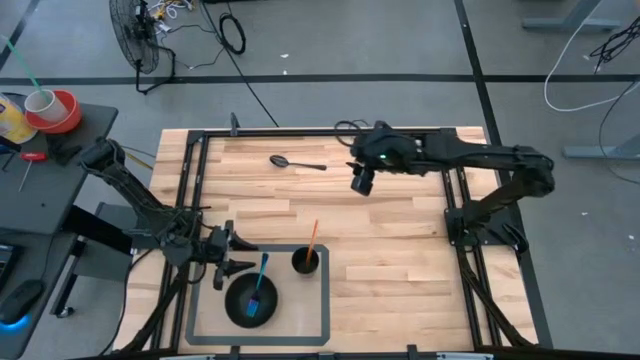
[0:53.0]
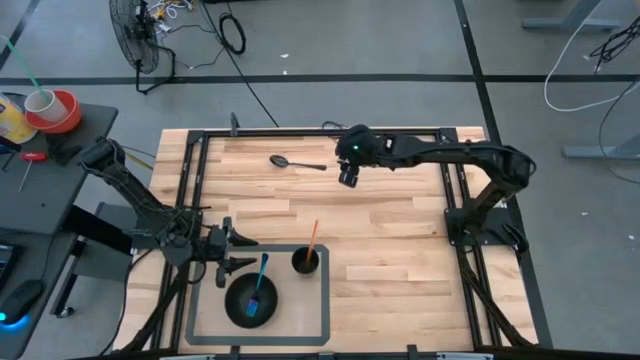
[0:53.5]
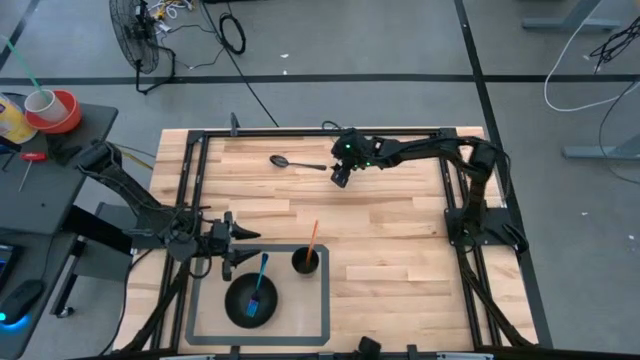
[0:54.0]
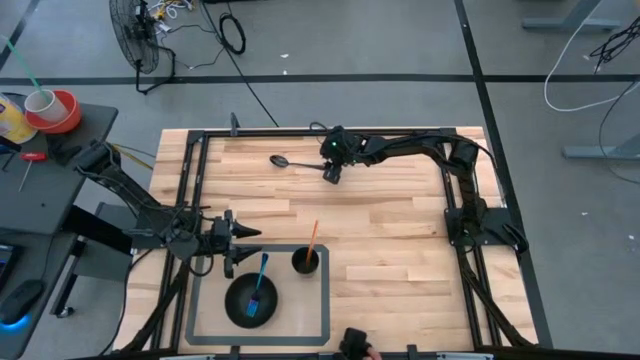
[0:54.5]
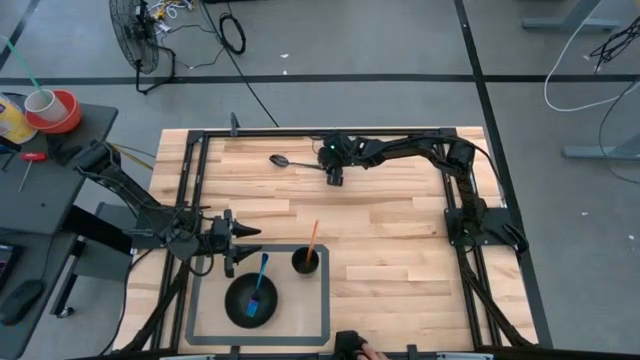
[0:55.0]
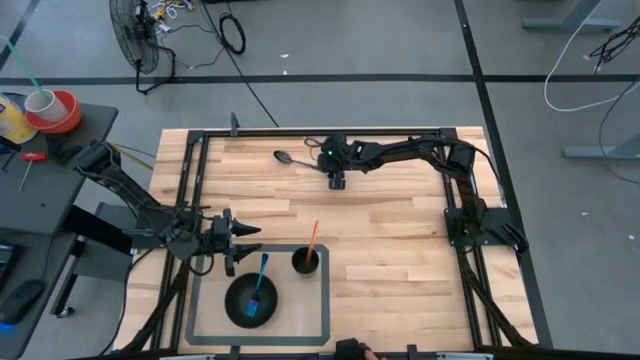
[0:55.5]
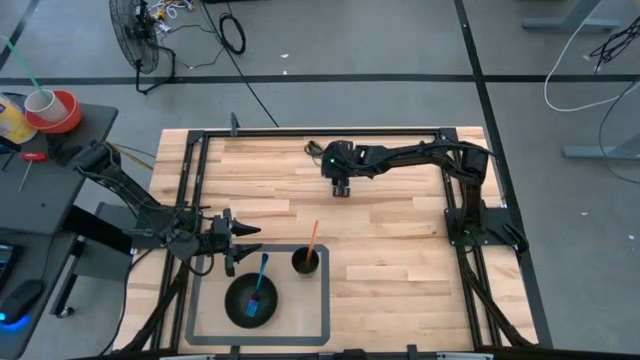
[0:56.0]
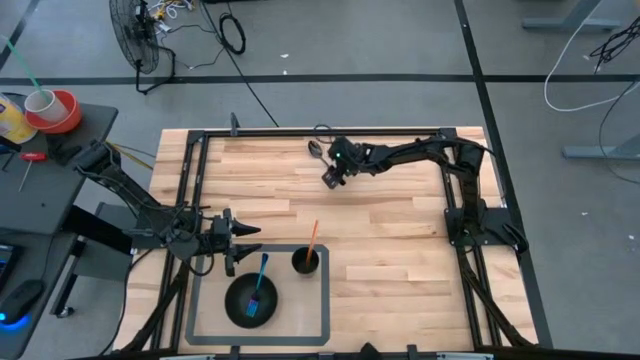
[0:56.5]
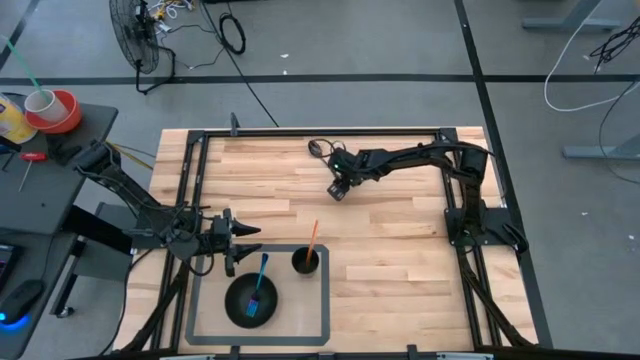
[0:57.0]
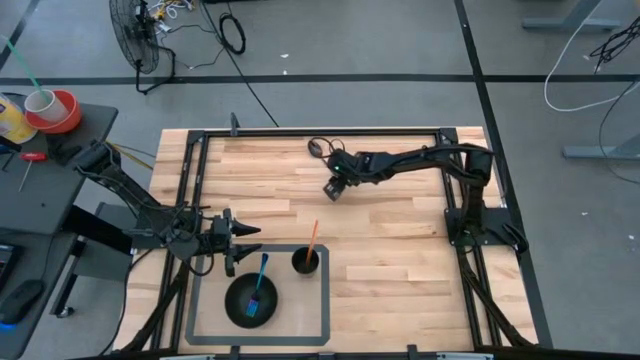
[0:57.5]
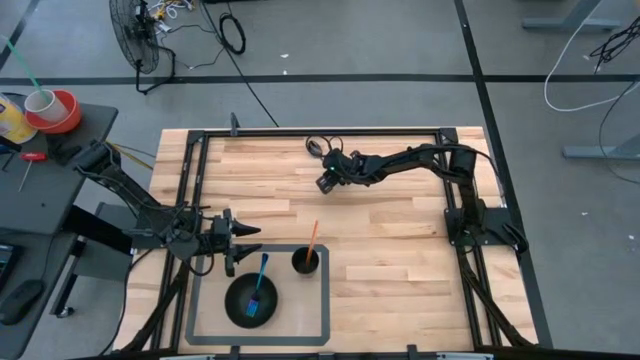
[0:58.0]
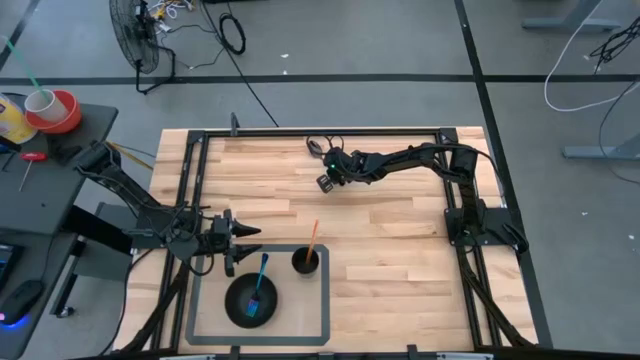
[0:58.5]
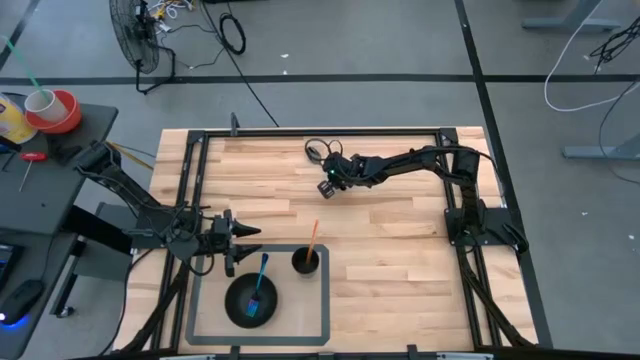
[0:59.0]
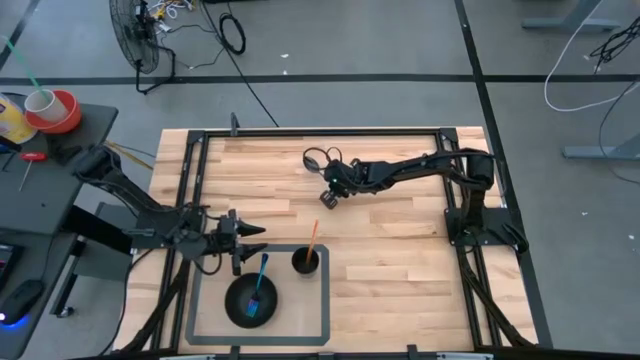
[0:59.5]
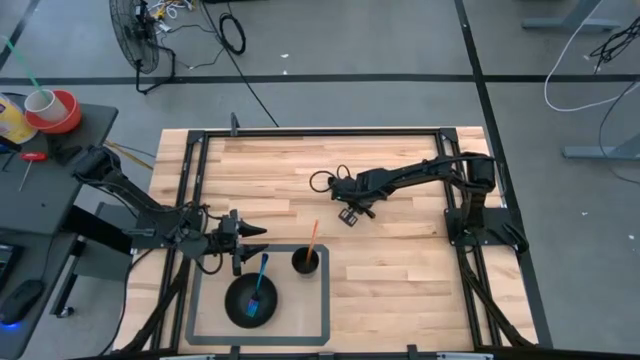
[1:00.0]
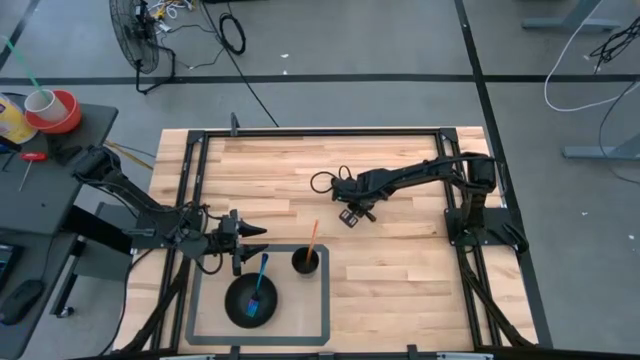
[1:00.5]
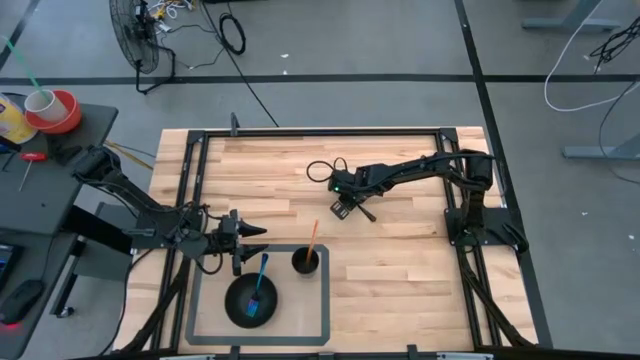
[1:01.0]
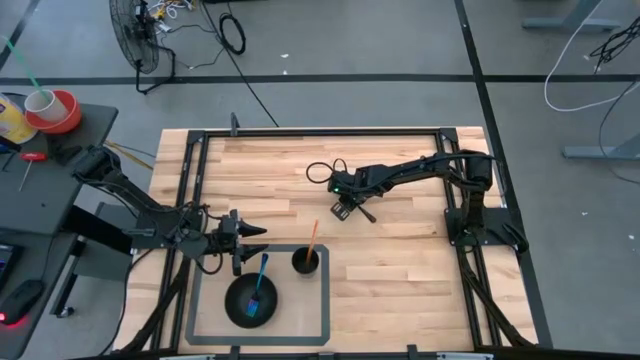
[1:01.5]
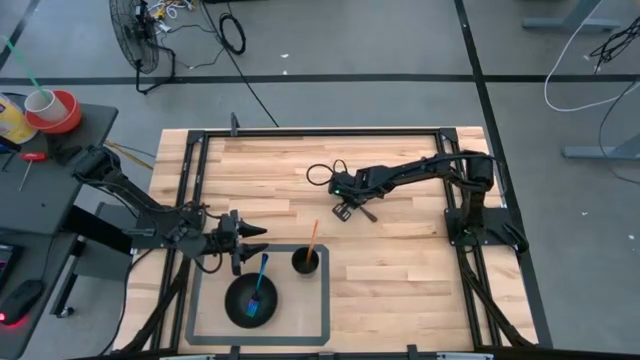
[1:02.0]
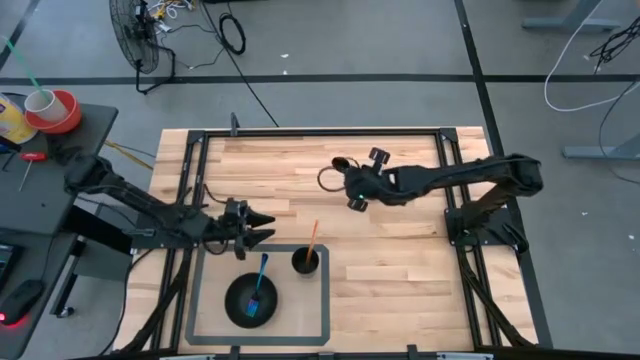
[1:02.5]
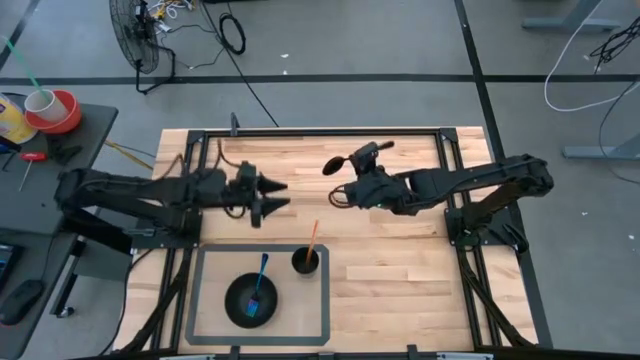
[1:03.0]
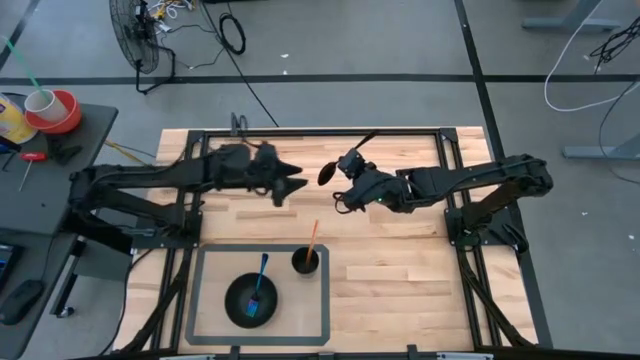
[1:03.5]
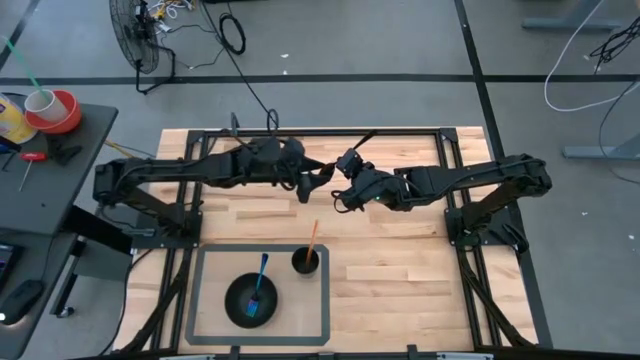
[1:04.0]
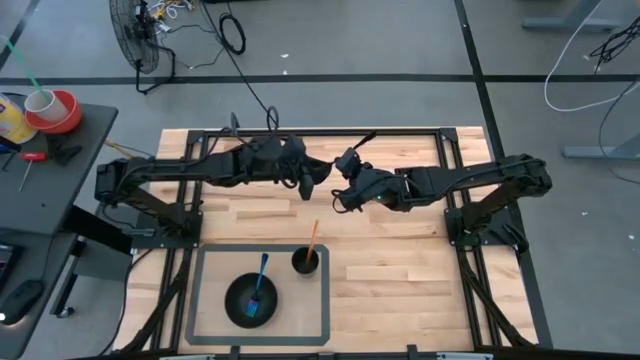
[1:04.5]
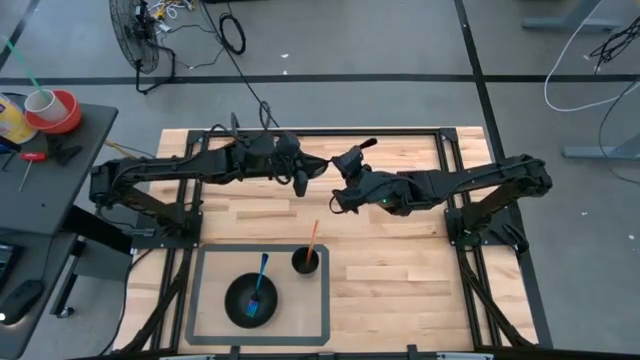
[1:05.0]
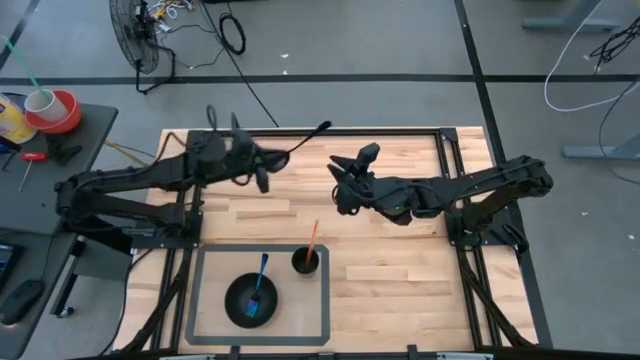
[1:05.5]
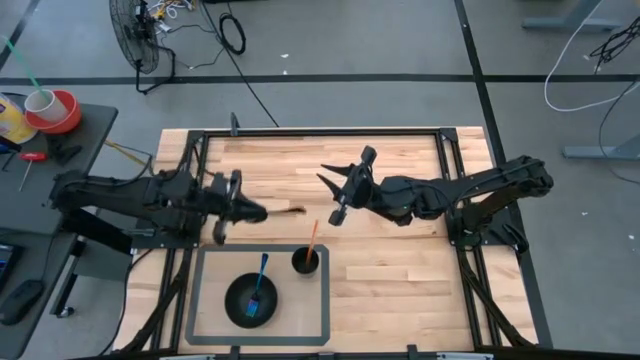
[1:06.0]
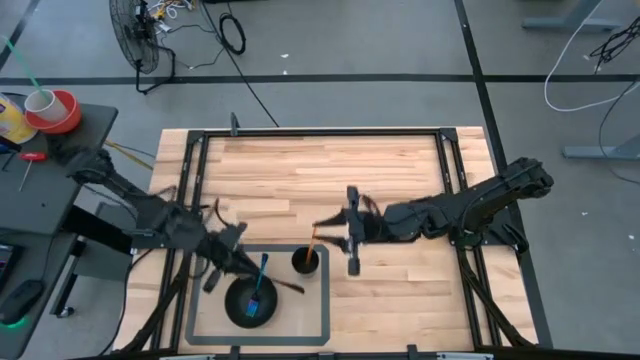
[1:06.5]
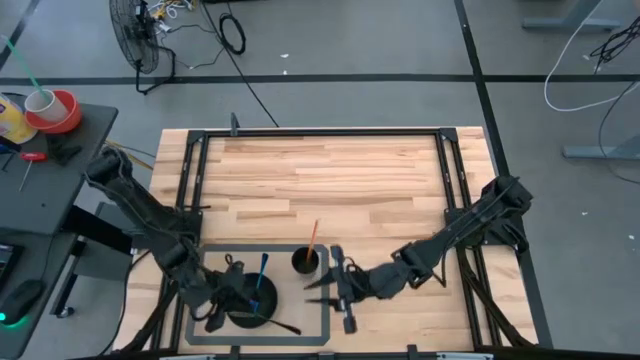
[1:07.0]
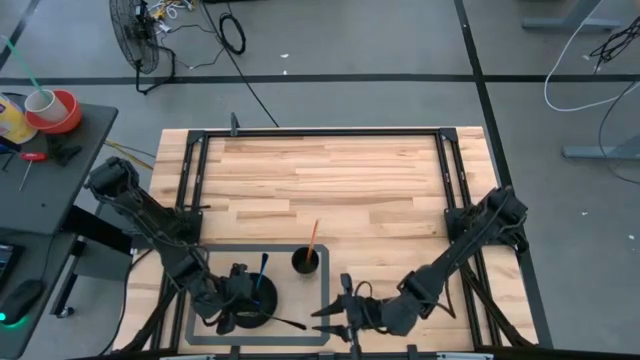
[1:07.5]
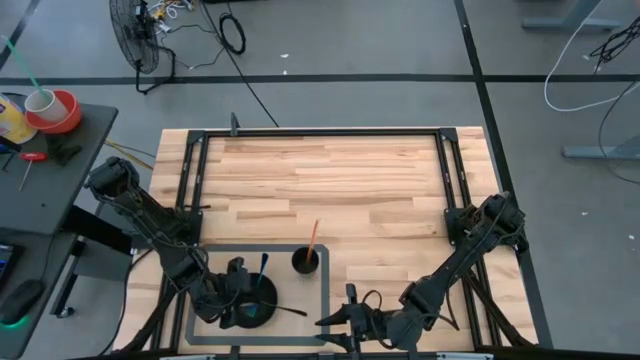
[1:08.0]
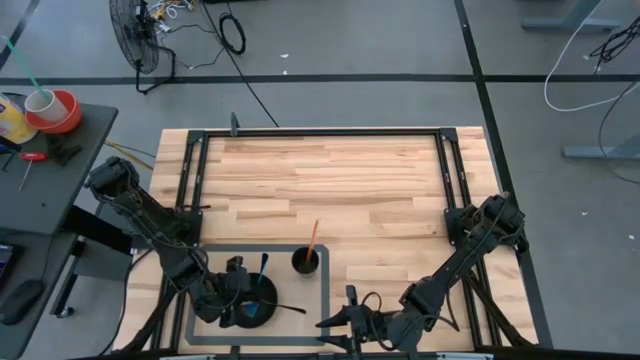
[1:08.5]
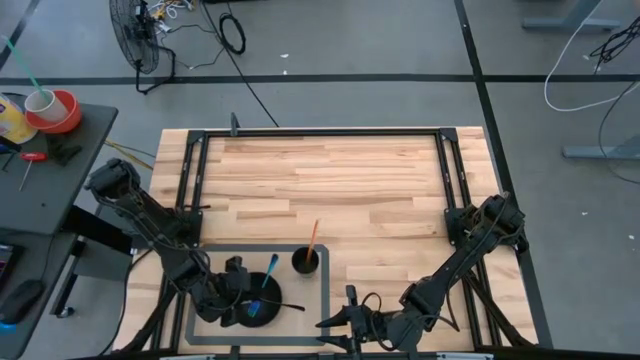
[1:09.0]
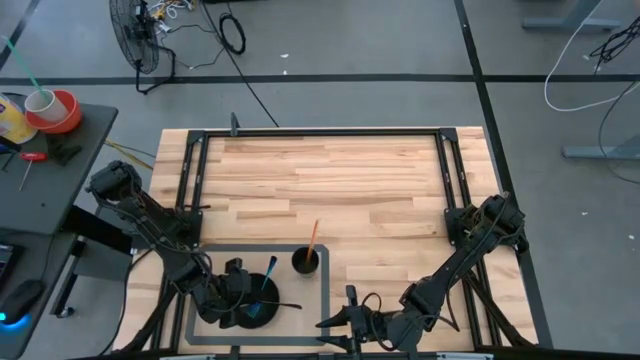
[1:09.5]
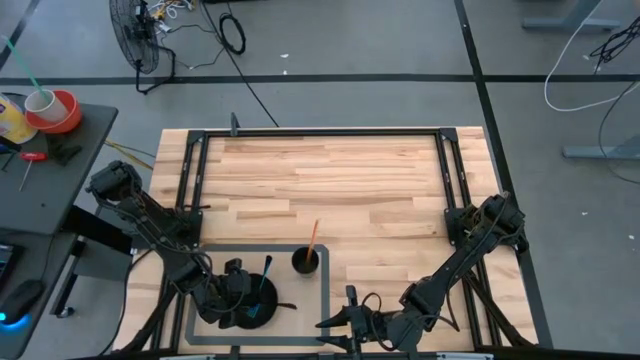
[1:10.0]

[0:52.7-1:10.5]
Task: Pick & Place Utensil
Put the black spoon into the black bowl

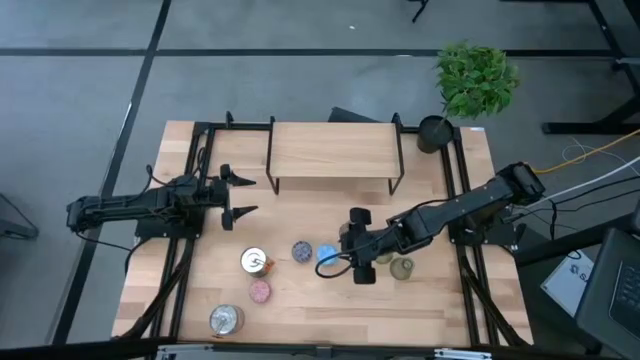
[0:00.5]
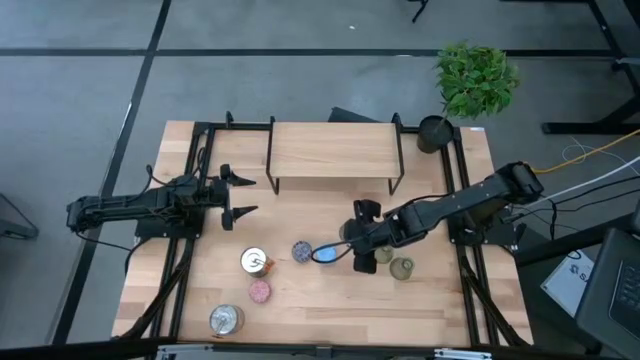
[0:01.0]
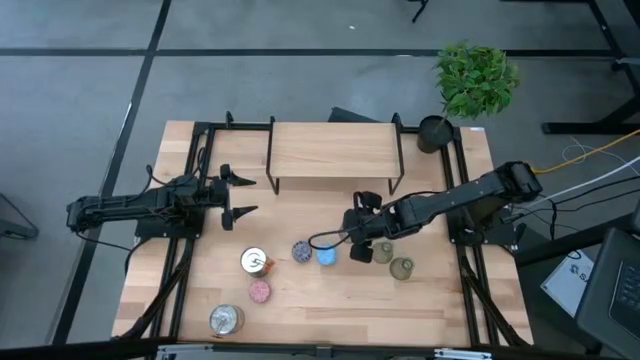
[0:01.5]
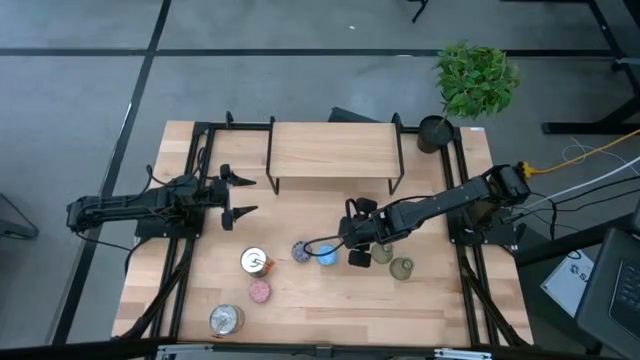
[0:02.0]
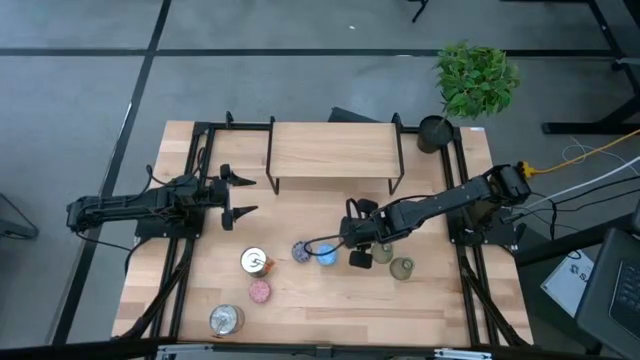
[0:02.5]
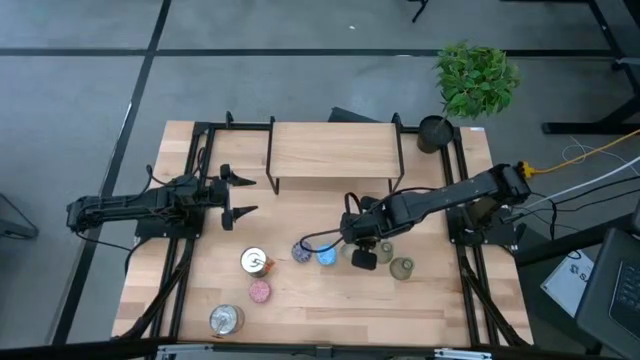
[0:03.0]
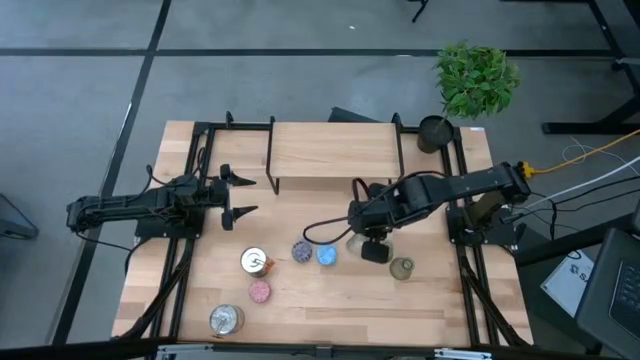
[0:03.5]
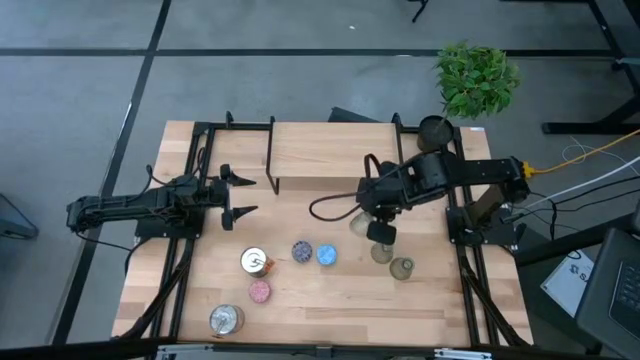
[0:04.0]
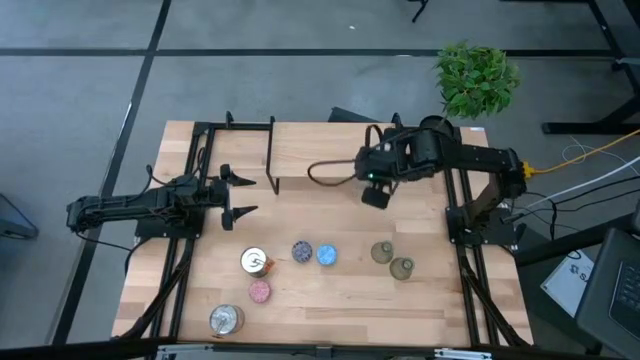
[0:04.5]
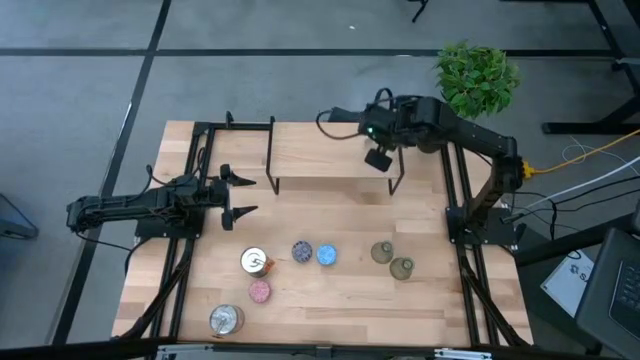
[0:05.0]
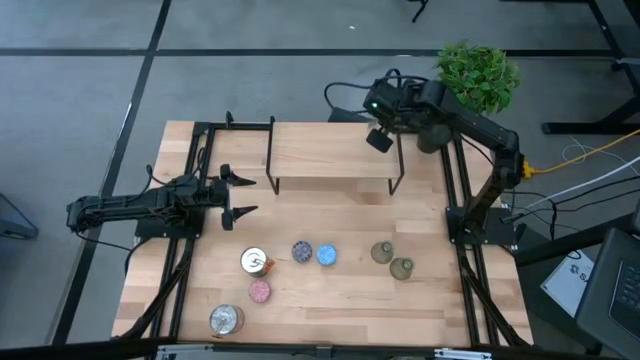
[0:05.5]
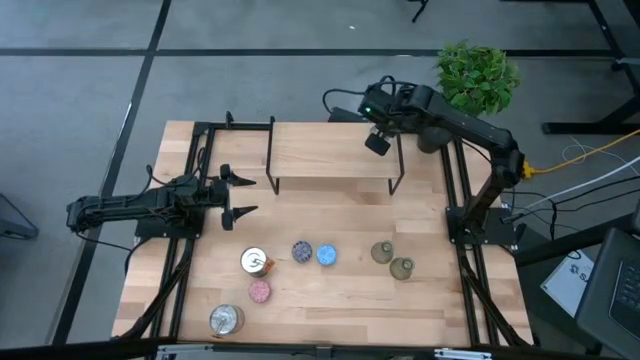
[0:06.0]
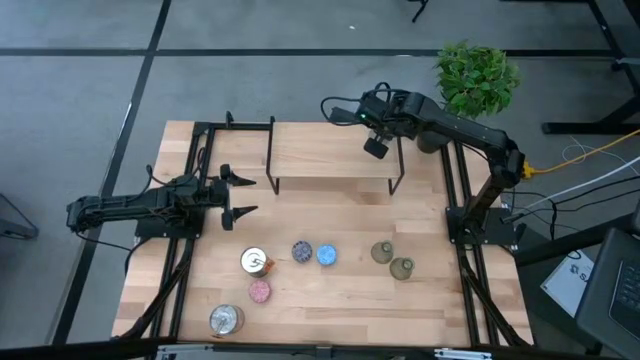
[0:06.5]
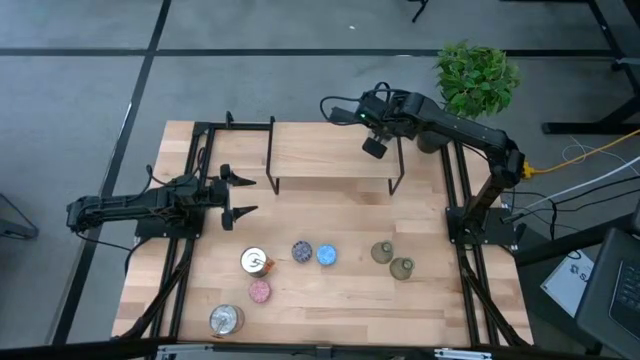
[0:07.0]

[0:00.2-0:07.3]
Task: Pick & Place candle stick holders
Put the left transparent glass candle holder on the shelf
